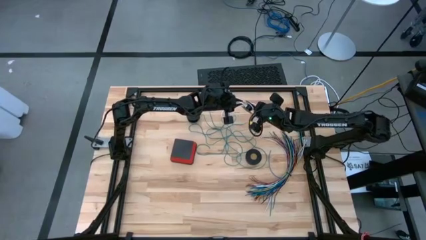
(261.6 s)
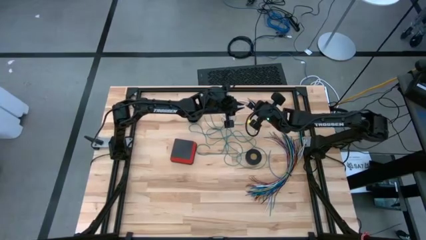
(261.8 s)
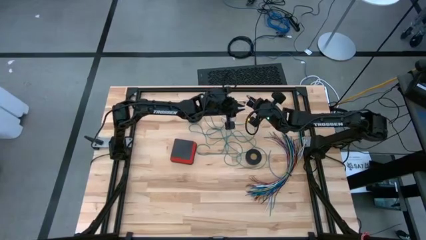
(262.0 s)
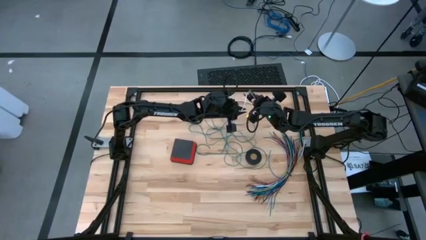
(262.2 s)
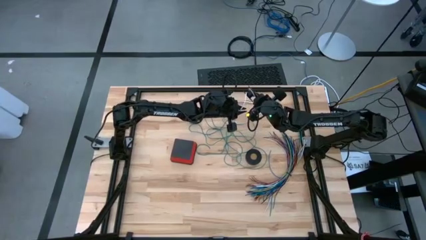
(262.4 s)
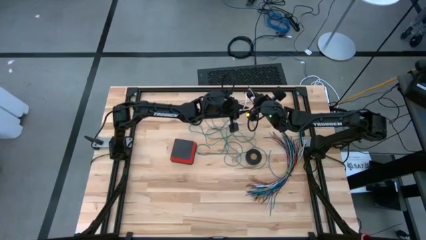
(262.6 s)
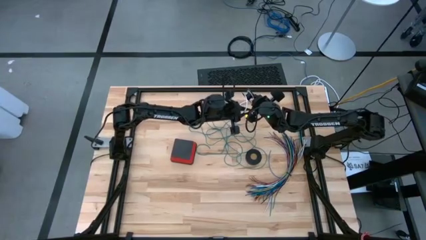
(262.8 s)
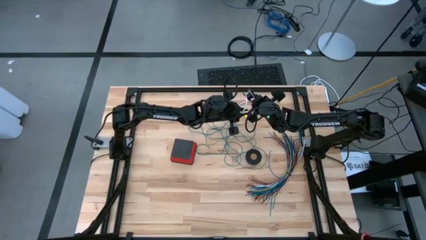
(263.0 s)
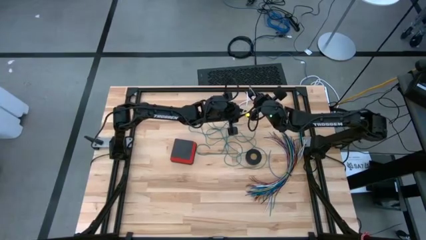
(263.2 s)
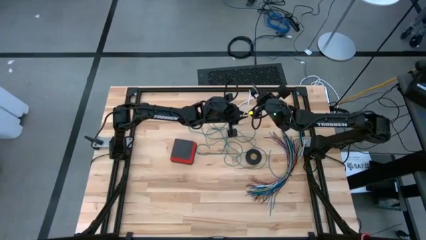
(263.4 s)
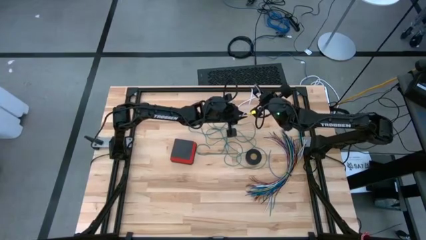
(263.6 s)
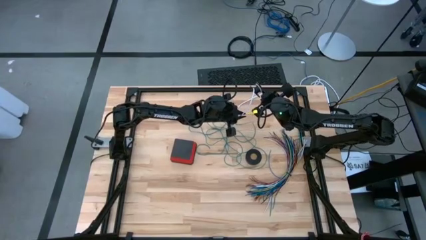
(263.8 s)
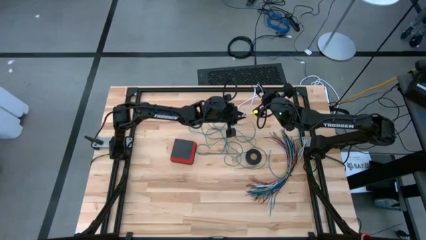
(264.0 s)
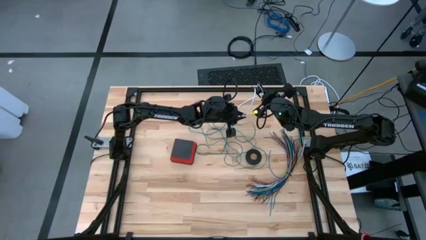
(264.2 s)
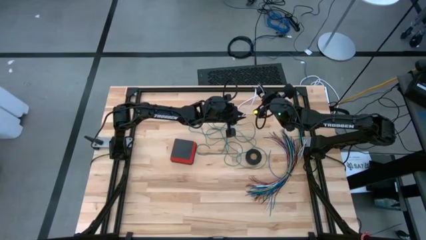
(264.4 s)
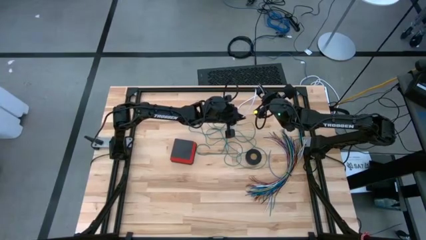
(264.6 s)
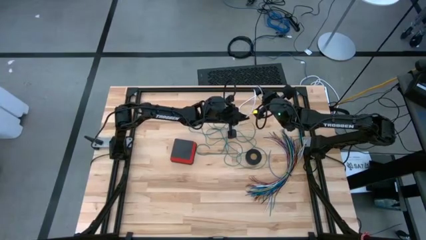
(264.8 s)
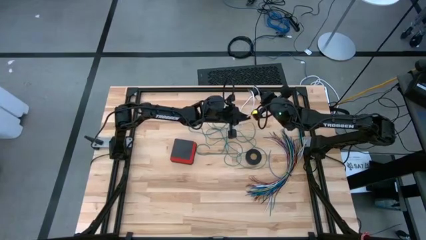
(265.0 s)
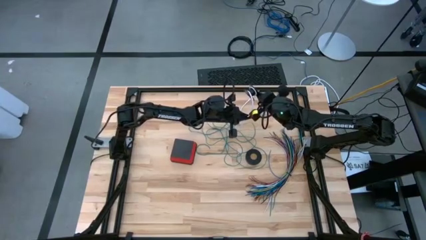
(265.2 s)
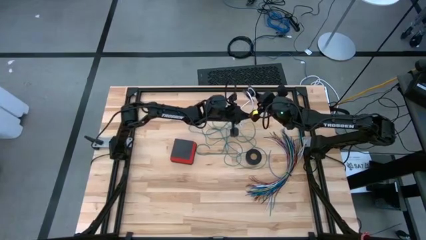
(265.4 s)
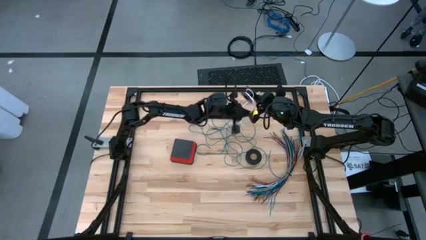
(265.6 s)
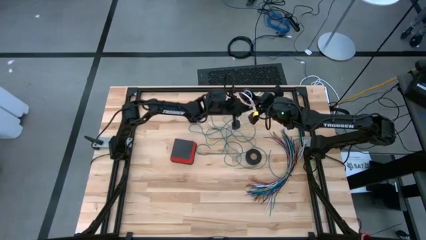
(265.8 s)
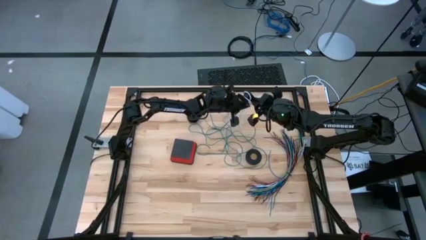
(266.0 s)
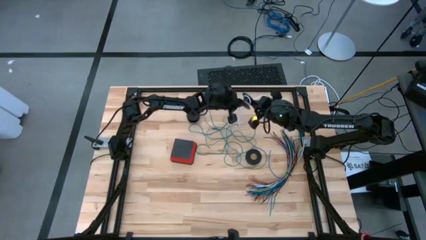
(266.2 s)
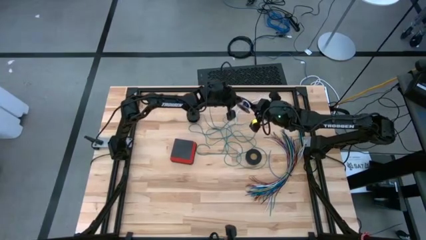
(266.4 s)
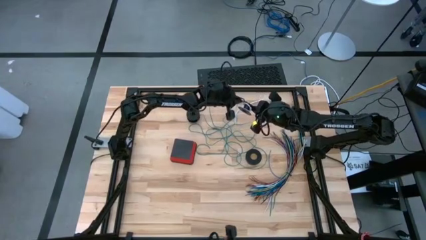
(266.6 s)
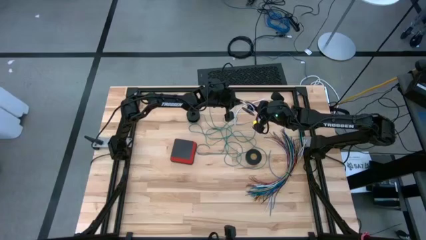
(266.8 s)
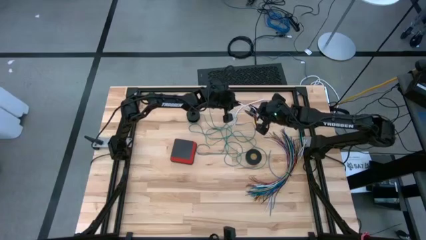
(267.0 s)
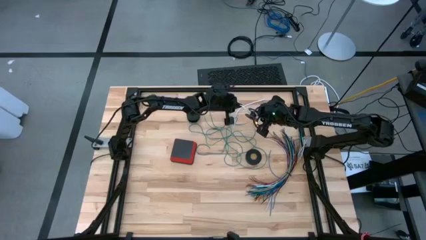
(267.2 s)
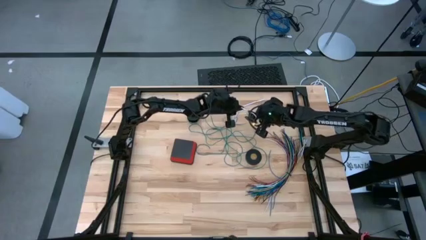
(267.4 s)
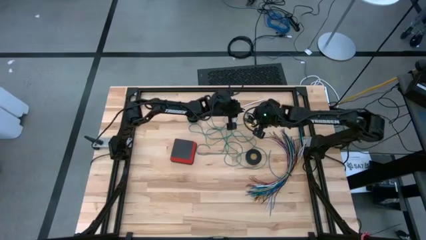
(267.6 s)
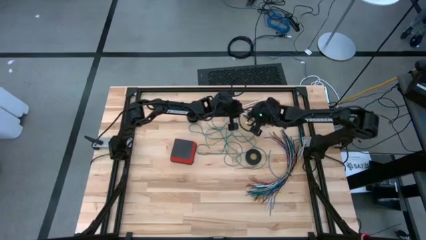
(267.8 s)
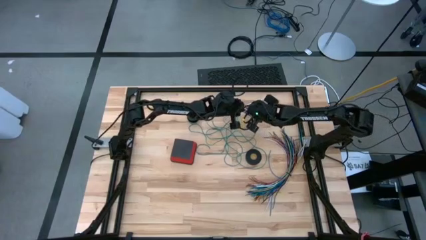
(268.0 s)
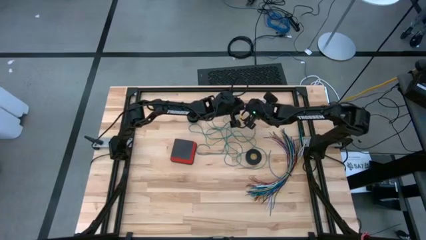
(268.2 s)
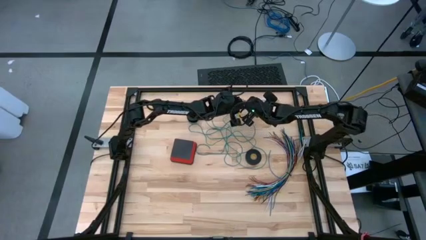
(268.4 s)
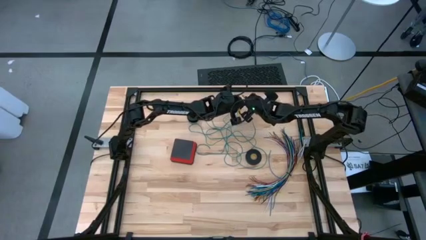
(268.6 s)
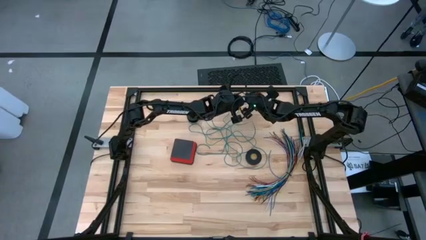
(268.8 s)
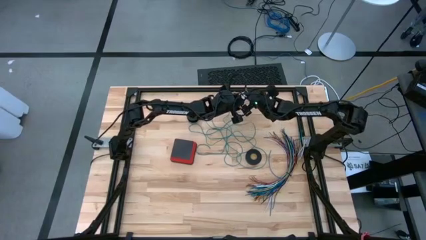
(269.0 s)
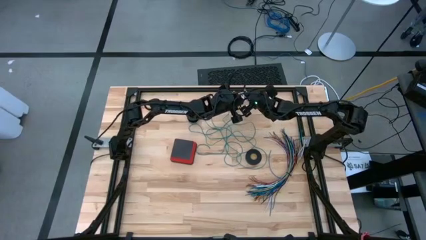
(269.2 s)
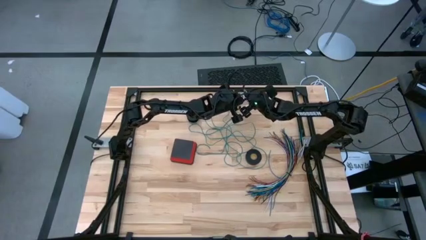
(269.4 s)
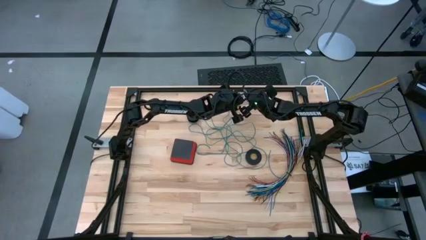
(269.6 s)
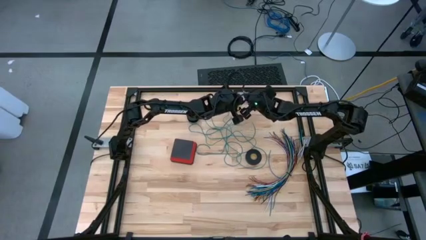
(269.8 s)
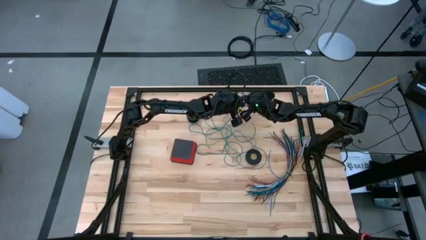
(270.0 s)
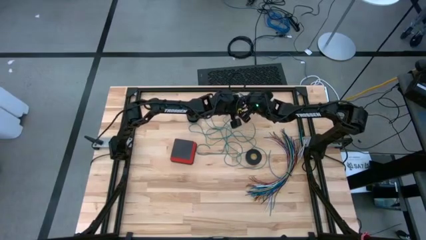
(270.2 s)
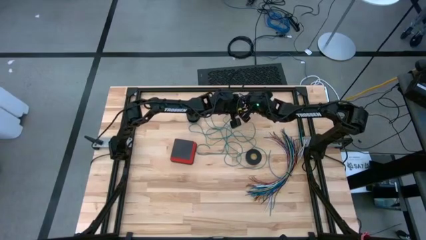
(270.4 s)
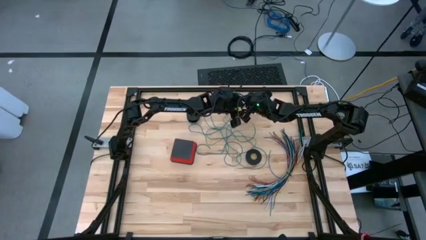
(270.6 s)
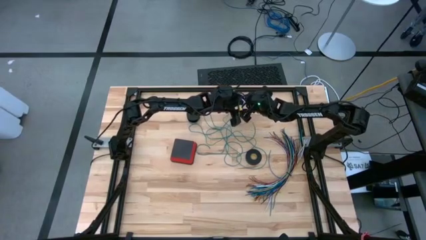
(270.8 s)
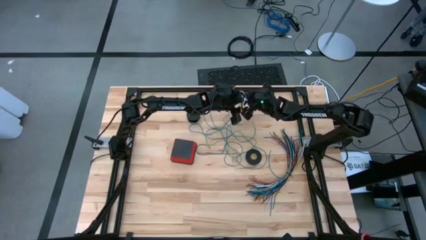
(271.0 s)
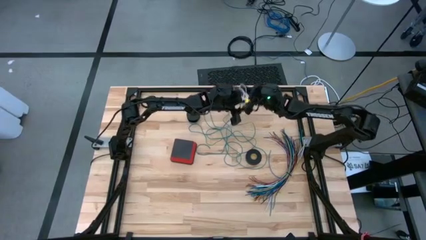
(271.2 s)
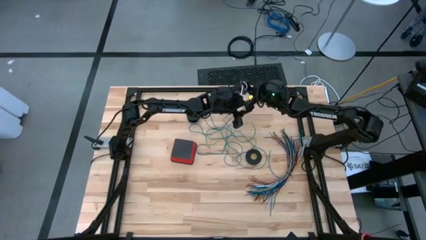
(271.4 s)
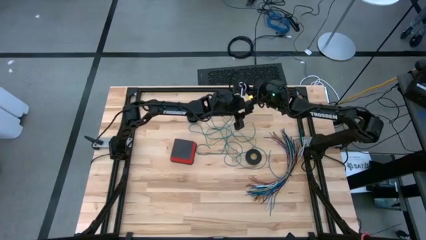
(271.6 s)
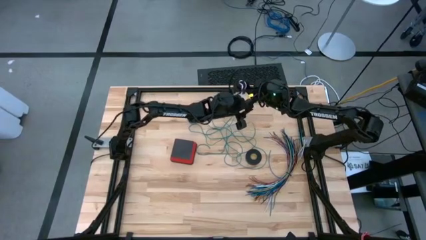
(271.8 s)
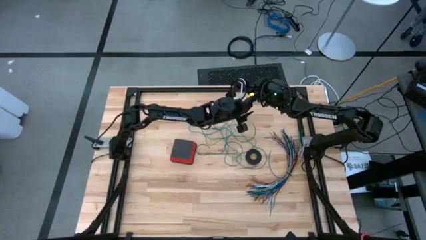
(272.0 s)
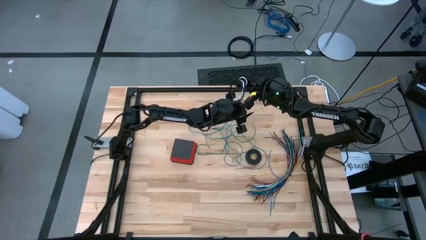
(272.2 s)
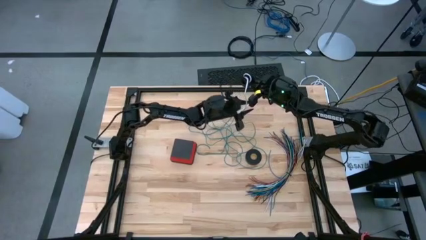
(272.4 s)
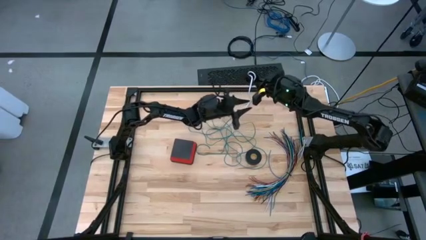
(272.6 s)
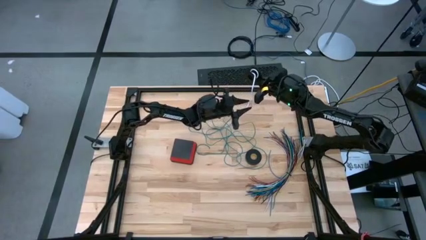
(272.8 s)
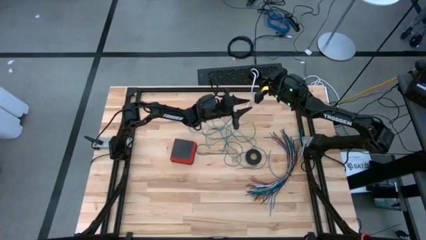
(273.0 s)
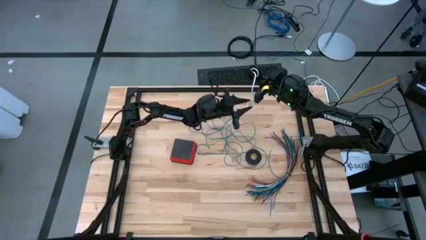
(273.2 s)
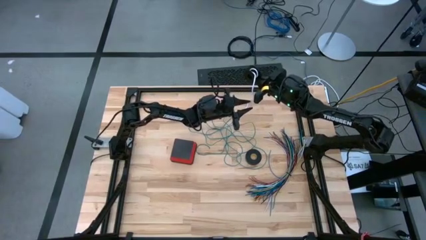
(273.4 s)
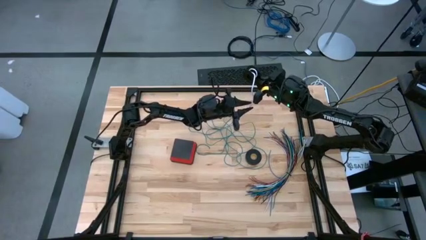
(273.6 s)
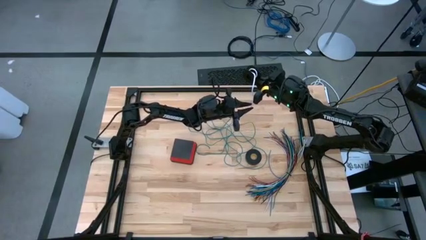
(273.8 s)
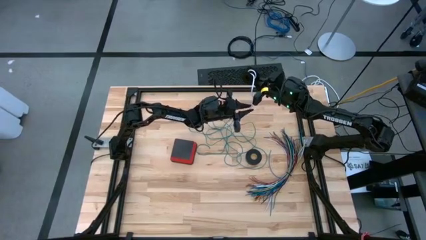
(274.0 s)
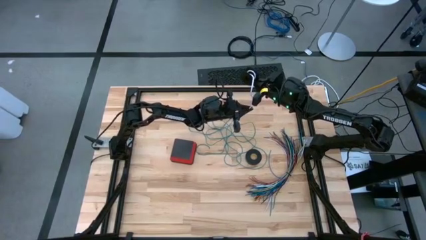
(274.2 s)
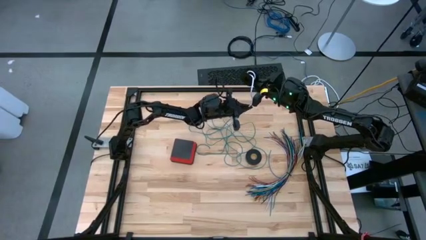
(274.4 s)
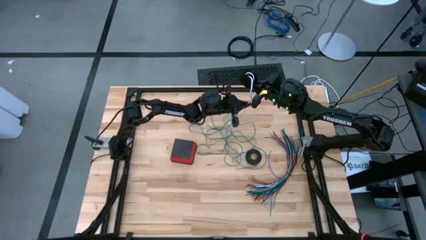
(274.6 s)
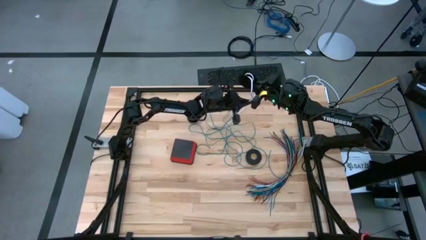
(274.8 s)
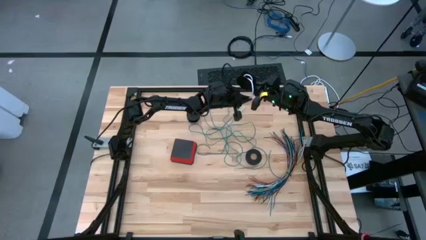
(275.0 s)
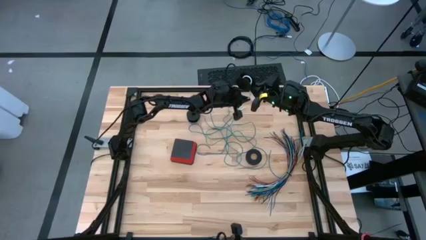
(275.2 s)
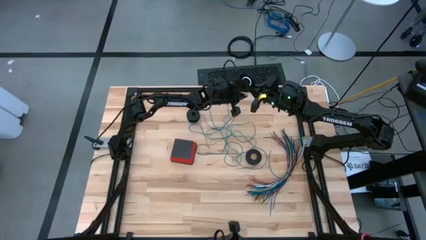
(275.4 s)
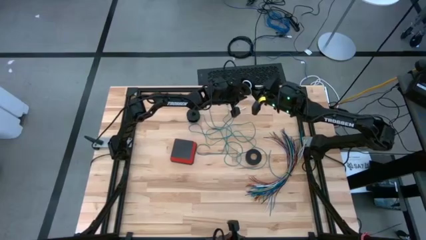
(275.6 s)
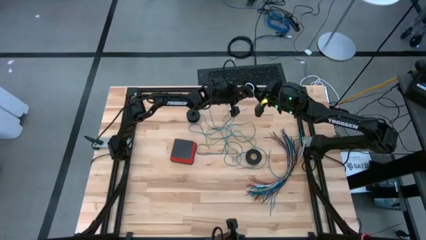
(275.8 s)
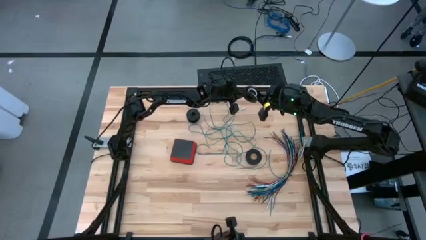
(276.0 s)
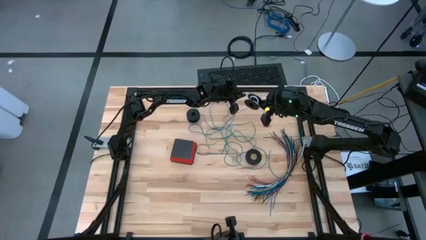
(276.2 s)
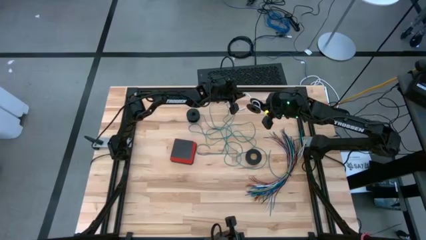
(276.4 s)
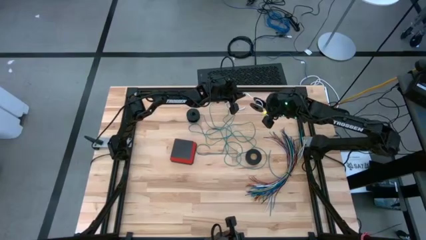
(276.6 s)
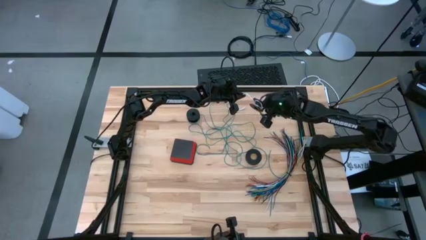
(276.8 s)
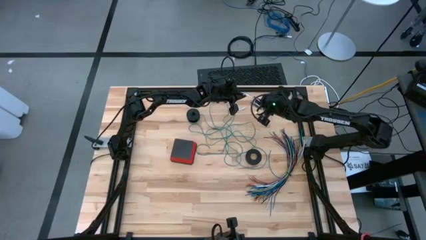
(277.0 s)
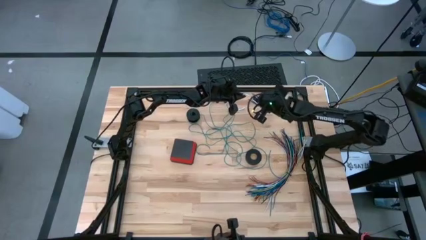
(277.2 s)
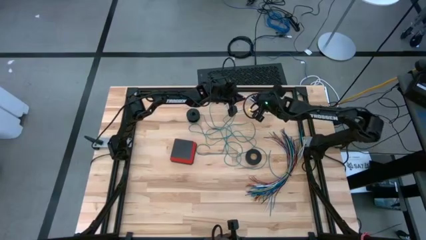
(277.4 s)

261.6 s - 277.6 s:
Task: Coiling cords
Coil the white wire cable on the spool
